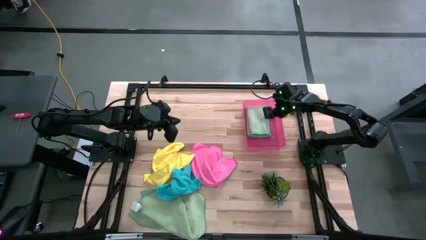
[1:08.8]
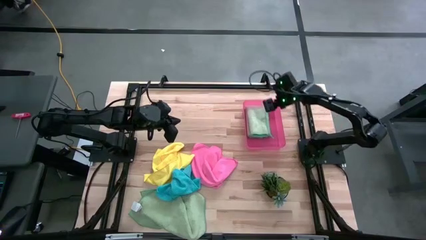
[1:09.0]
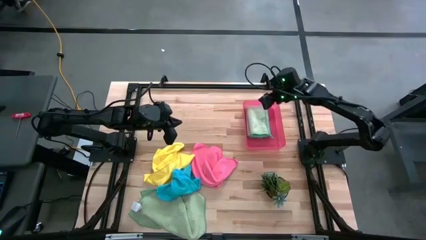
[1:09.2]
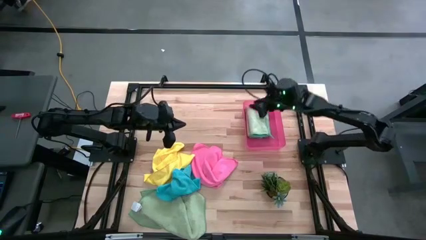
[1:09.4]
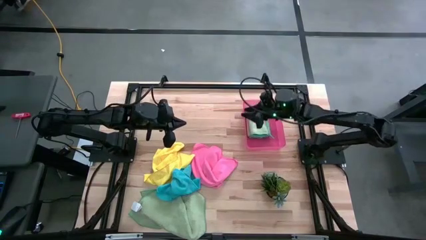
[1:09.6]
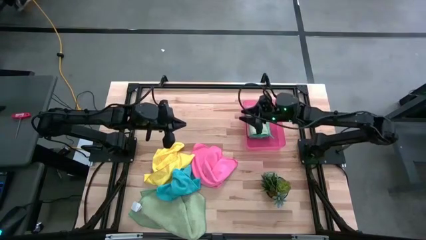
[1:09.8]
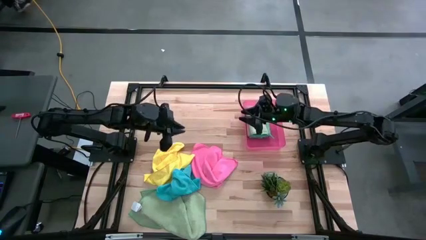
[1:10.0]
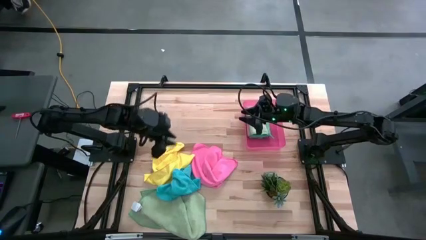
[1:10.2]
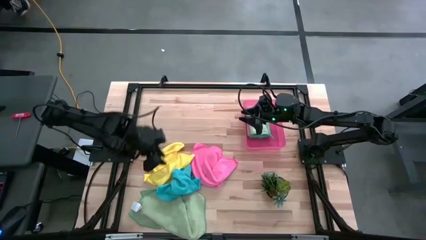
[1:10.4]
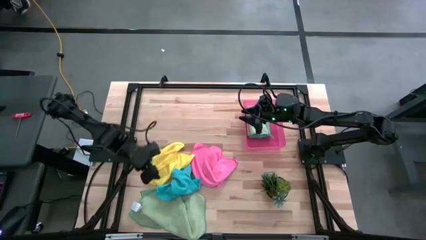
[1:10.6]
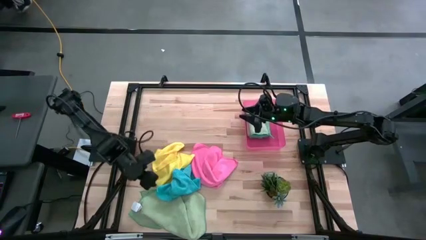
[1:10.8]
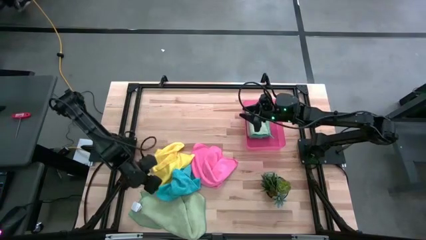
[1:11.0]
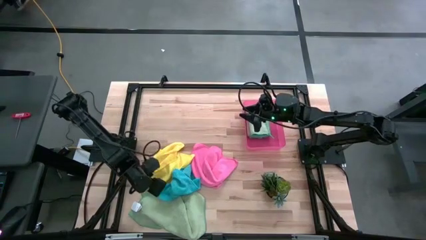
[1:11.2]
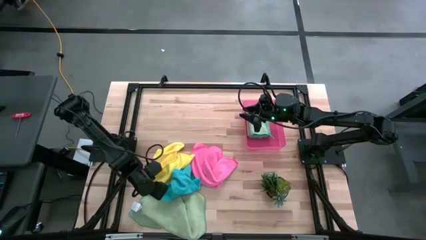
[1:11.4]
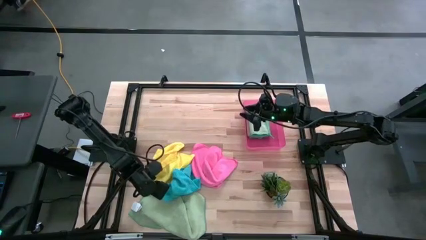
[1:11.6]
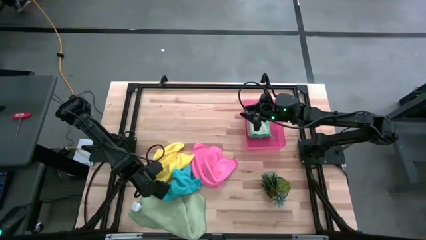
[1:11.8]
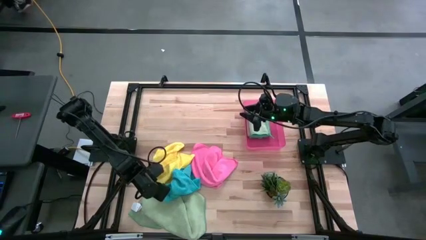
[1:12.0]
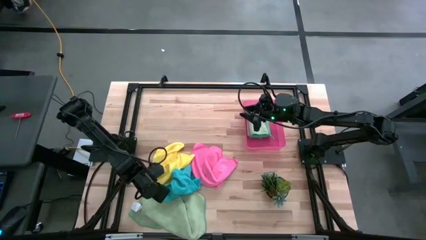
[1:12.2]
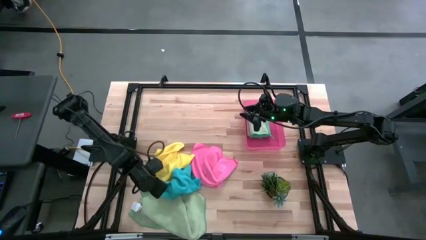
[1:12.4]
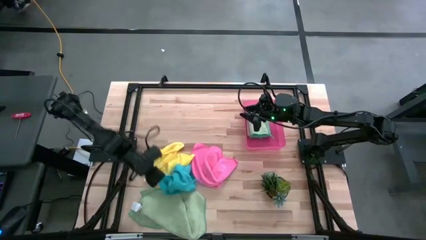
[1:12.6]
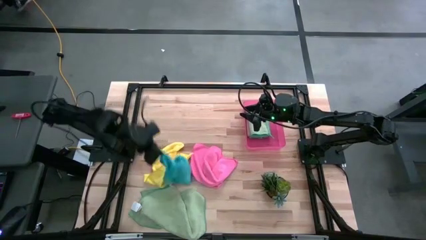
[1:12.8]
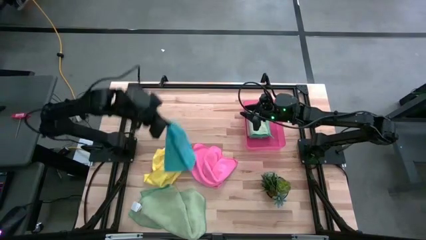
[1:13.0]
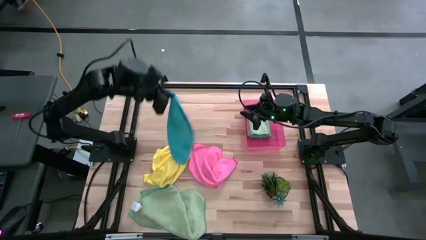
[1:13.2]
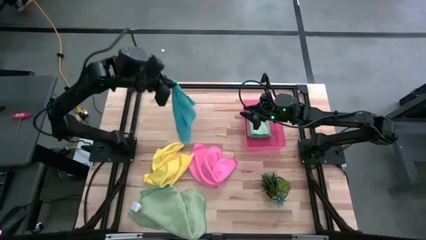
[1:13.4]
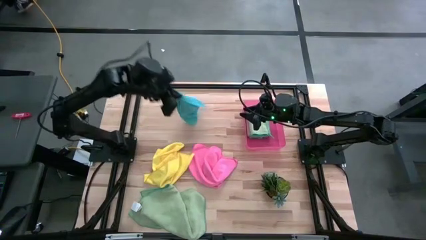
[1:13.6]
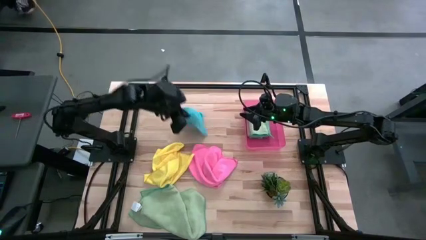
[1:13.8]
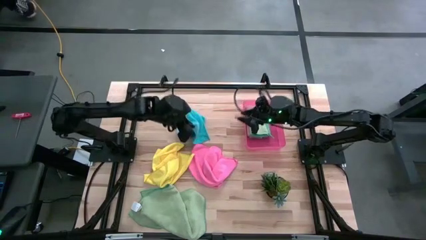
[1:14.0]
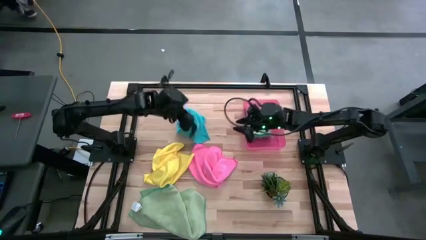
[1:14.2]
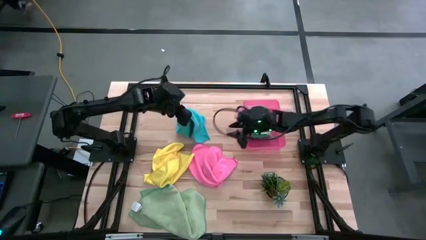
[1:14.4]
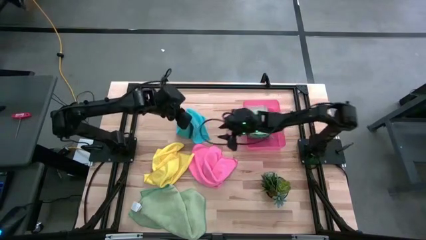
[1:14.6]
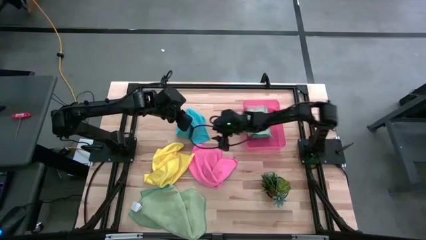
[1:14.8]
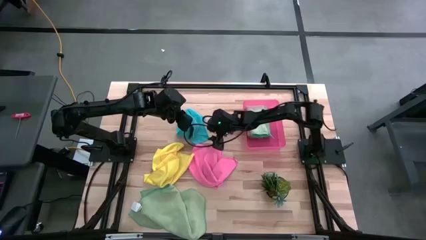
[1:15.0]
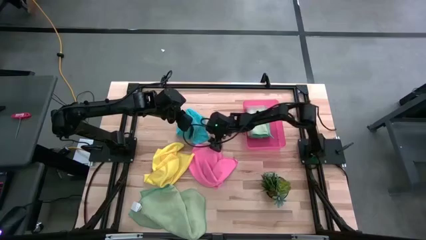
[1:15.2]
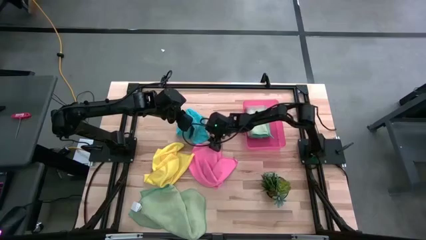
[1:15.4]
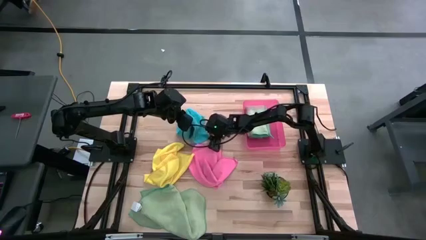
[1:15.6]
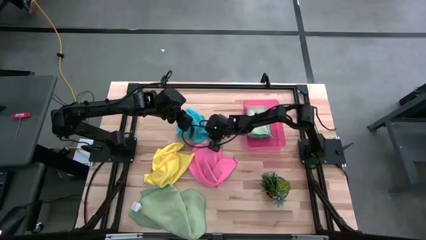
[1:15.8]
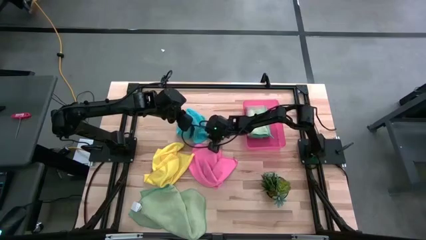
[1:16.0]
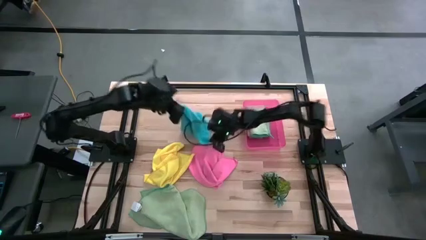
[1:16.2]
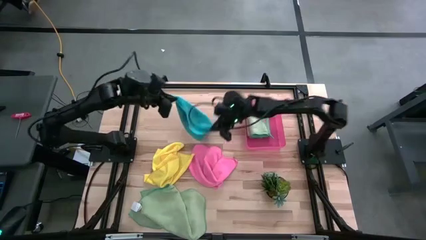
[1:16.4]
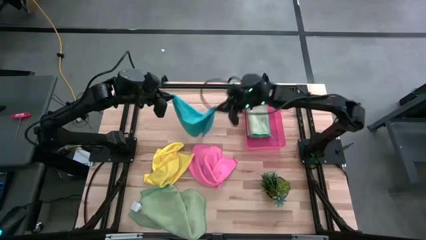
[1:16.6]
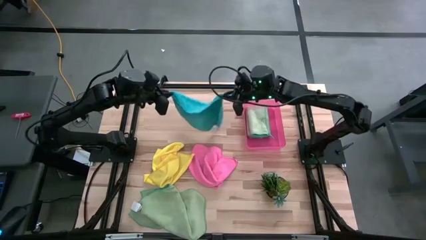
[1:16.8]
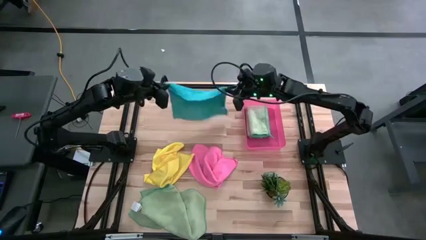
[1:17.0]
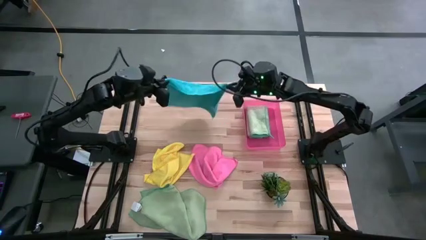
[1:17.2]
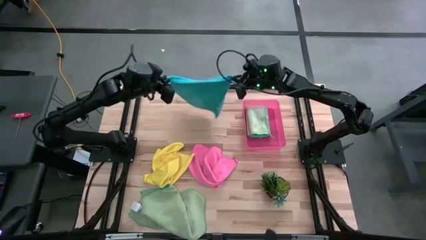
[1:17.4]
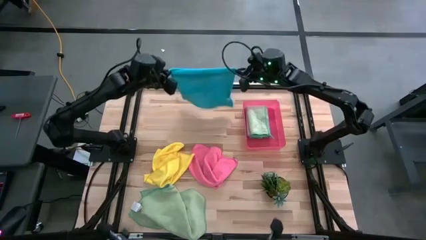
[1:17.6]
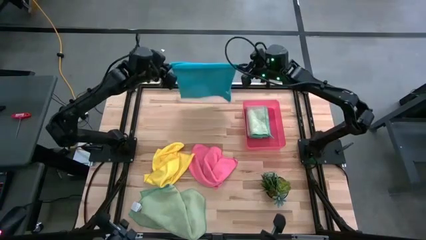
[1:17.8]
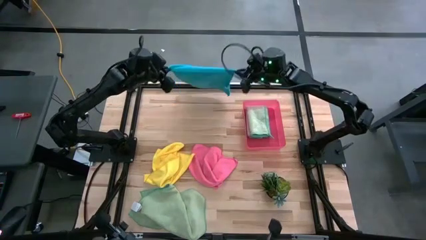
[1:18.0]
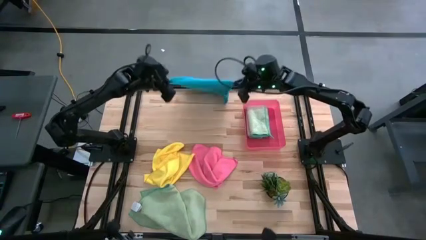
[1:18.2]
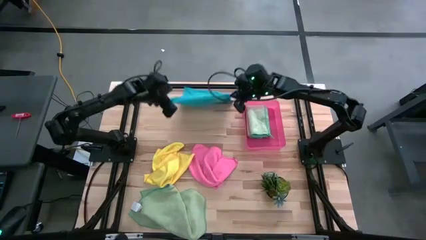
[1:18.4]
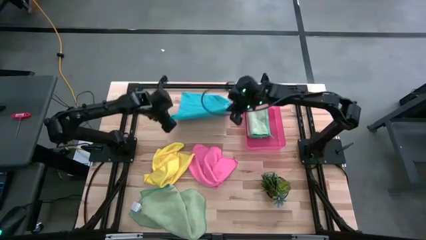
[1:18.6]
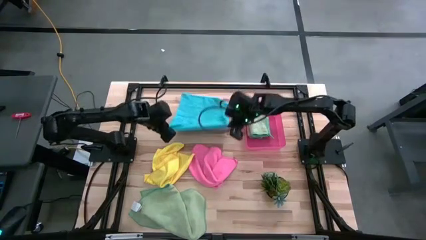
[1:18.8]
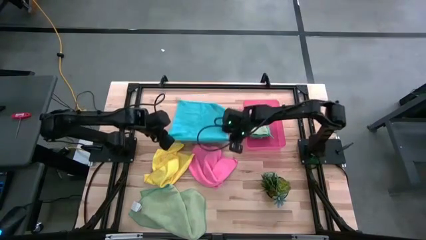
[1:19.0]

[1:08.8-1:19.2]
Task: Fold microfiber towels
Fold the blue microfiber cloth

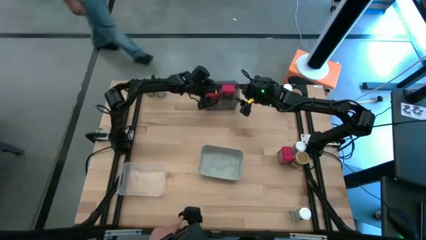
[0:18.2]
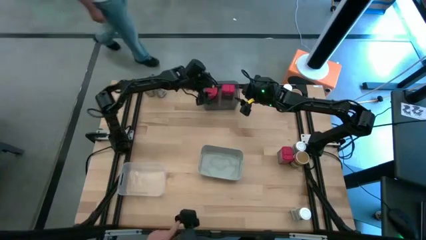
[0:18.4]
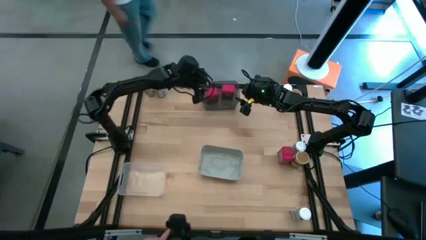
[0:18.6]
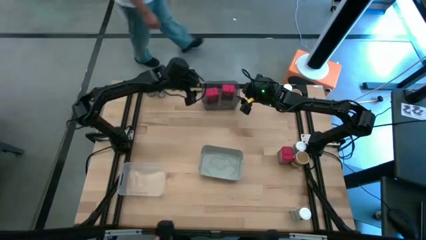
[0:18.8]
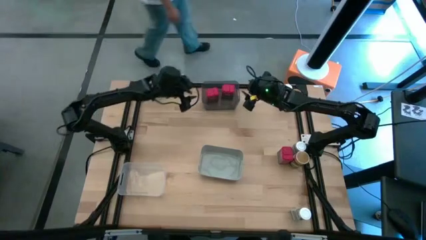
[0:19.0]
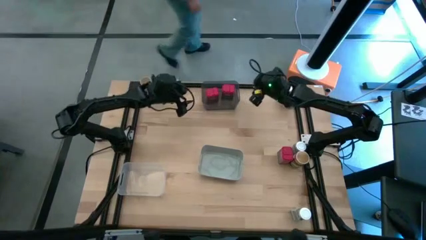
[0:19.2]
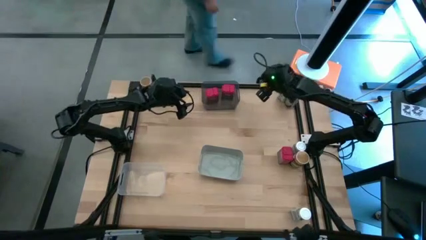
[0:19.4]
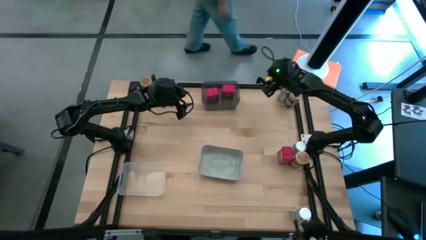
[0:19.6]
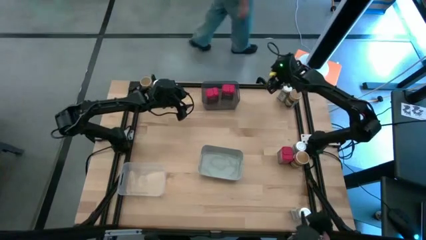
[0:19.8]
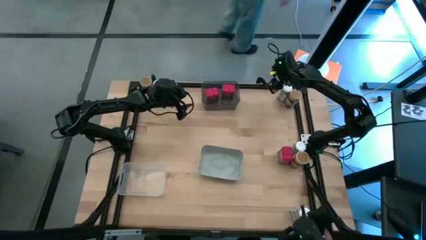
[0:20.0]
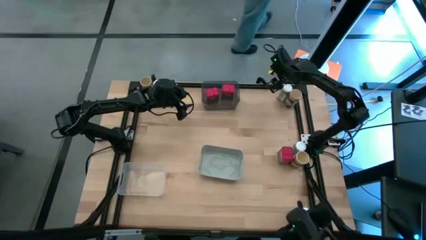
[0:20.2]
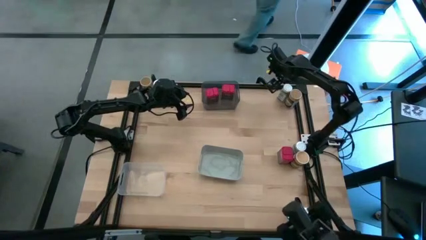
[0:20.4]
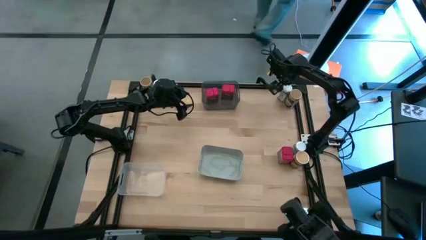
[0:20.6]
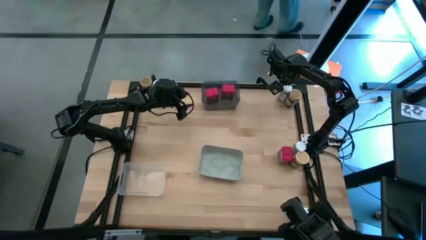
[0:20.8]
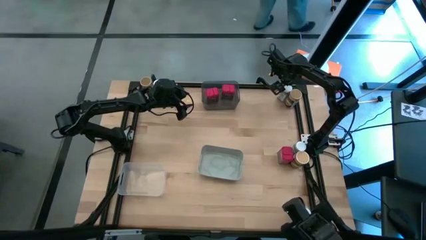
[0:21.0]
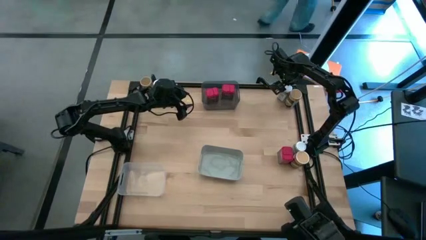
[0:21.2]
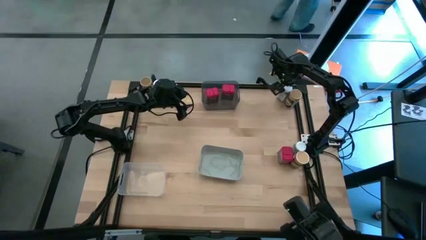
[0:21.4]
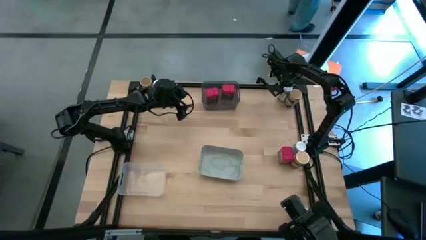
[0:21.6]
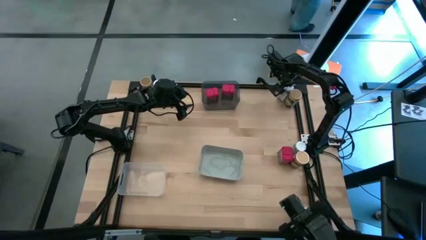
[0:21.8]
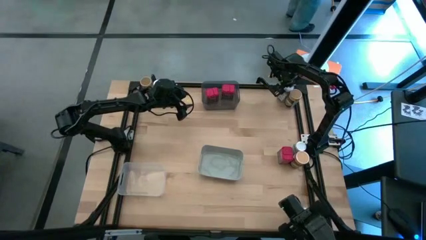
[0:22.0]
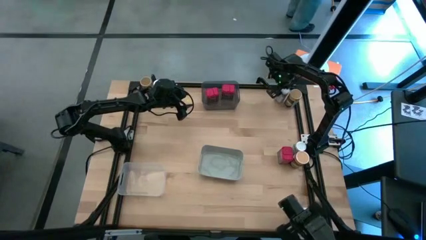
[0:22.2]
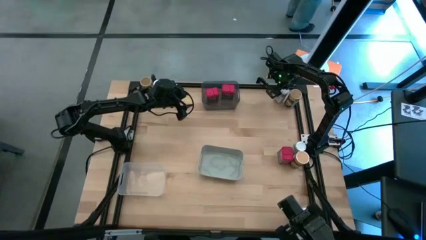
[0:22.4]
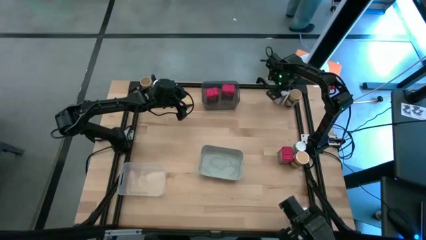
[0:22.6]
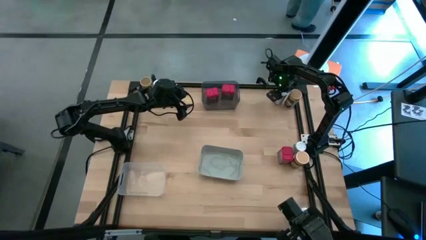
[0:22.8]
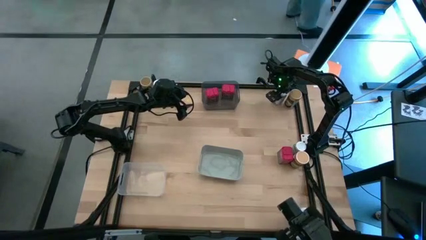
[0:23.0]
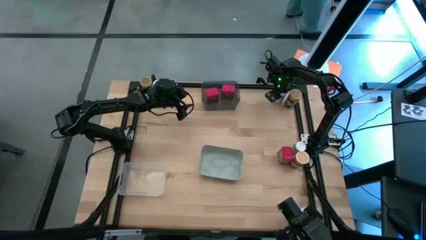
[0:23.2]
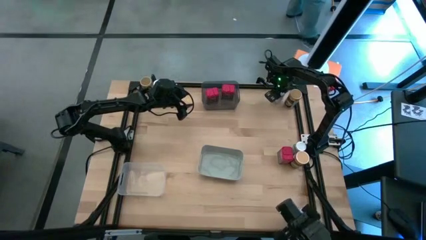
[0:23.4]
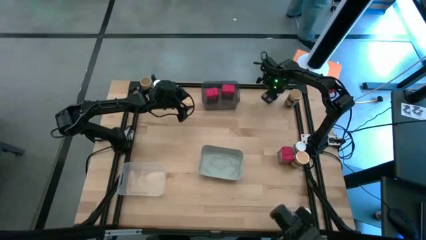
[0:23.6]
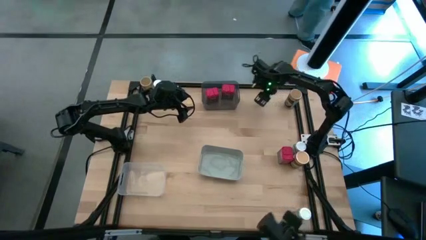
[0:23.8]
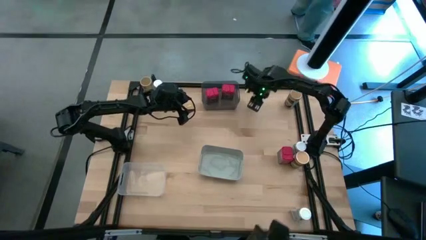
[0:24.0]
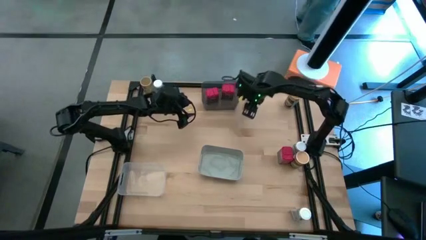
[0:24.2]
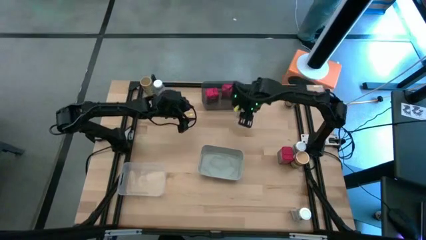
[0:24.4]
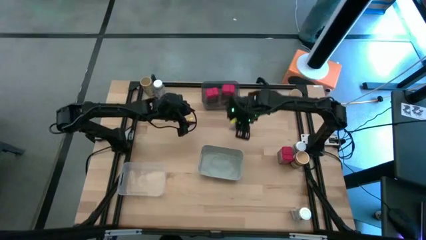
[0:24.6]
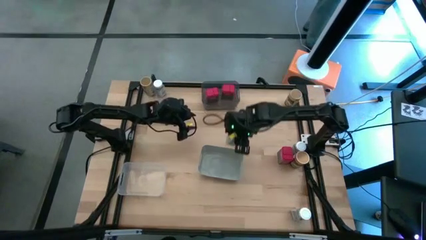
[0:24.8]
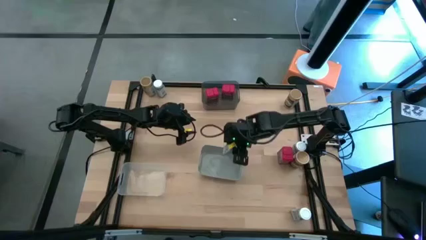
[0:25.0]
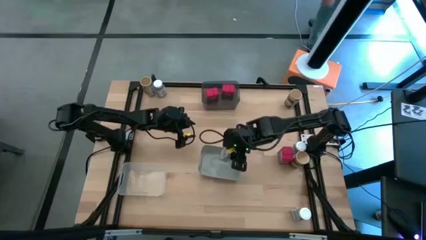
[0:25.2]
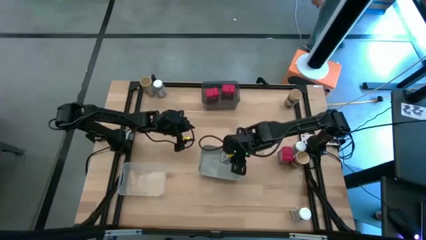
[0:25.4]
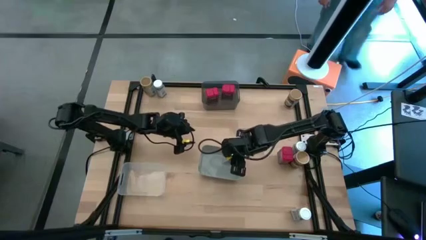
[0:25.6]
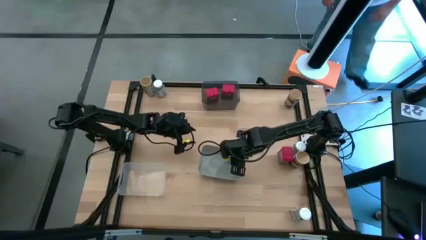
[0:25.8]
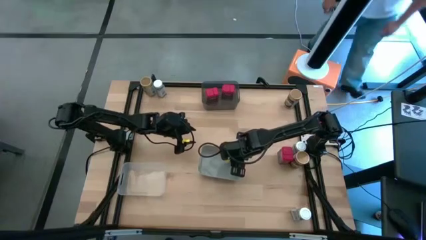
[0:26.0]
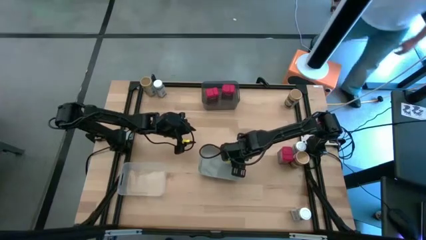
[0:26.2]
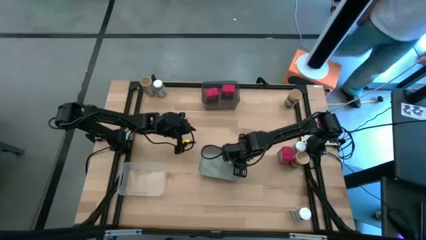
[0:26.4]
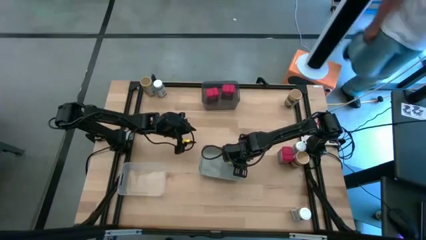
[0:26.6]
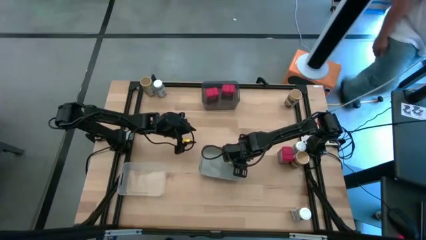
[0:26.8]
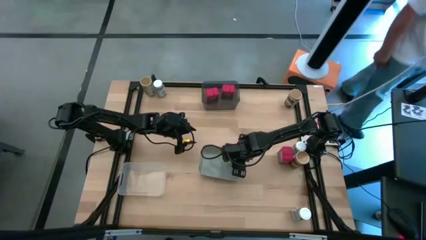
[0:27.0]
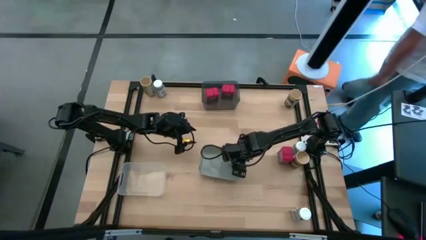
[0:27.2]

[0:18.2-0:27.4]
Task: Sort spices by type
Put the top right white seasoning bottle into the gray bin
